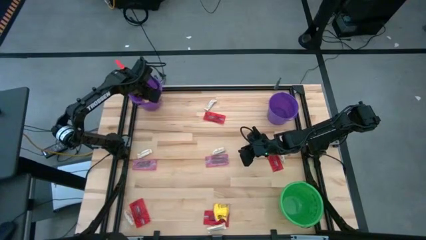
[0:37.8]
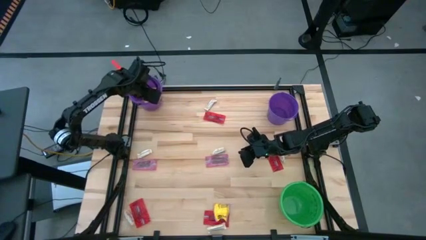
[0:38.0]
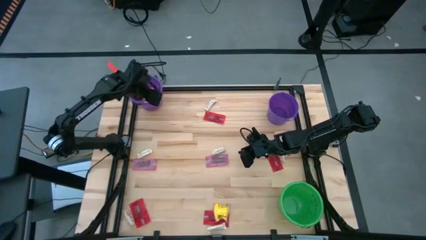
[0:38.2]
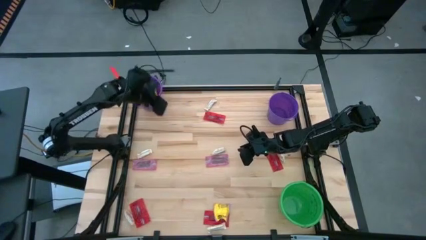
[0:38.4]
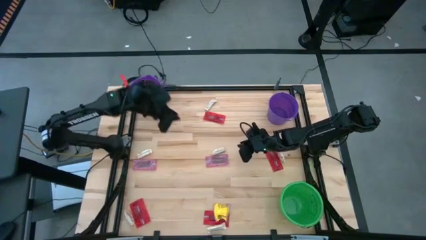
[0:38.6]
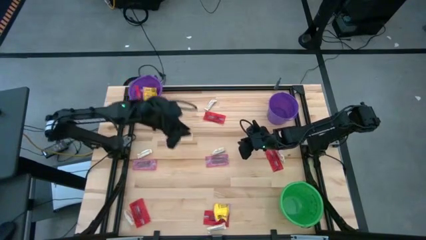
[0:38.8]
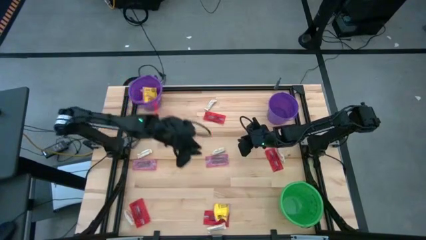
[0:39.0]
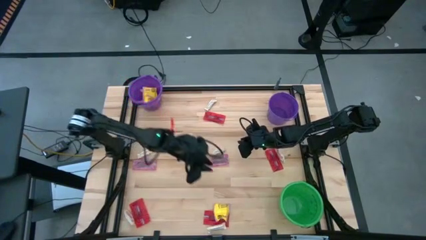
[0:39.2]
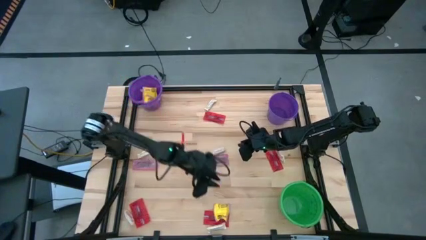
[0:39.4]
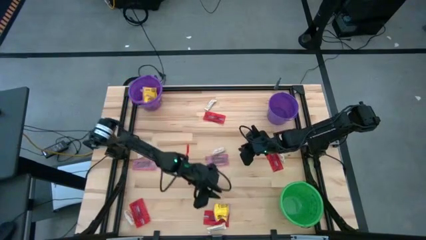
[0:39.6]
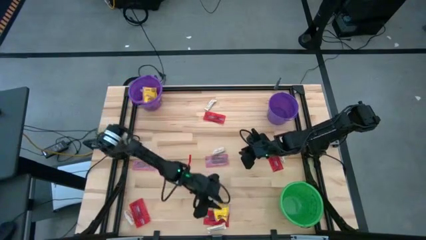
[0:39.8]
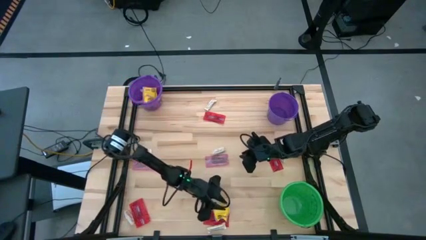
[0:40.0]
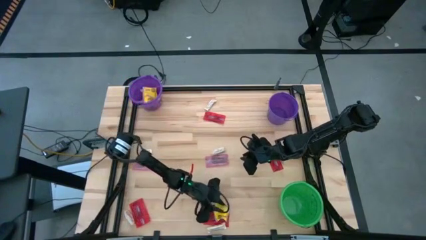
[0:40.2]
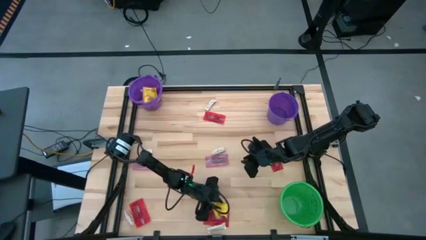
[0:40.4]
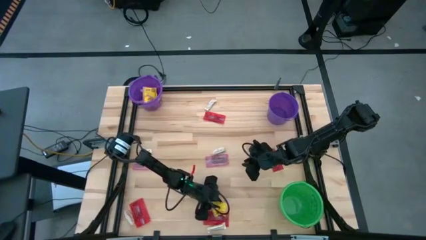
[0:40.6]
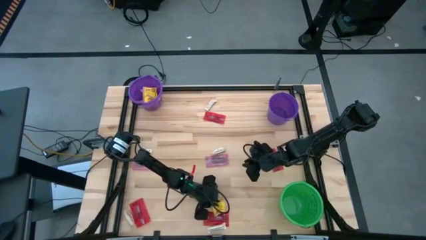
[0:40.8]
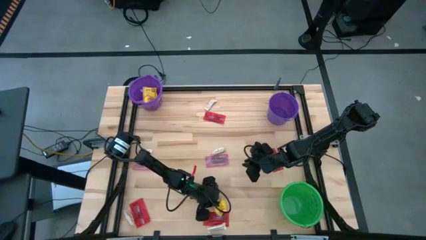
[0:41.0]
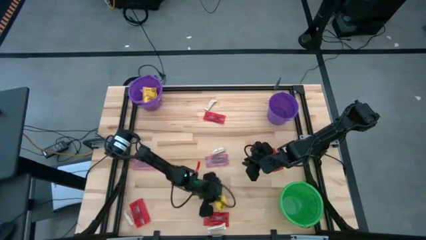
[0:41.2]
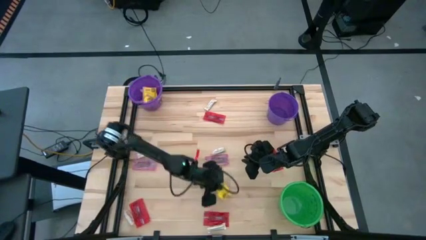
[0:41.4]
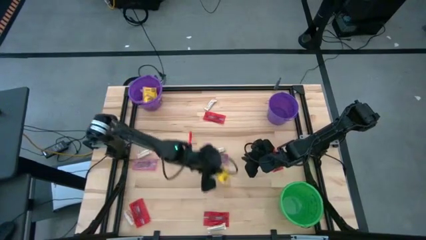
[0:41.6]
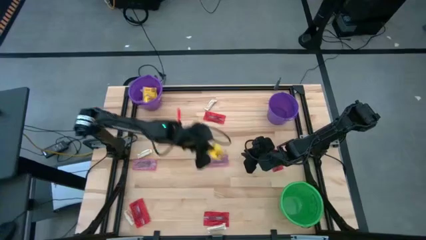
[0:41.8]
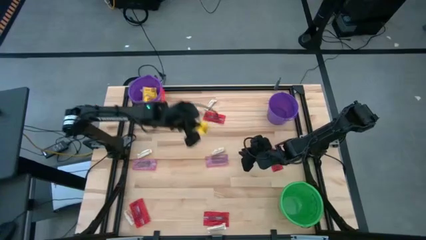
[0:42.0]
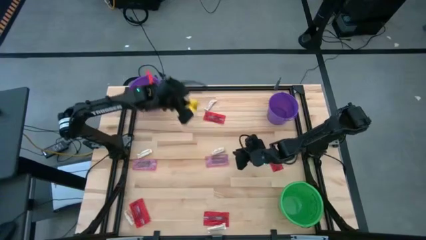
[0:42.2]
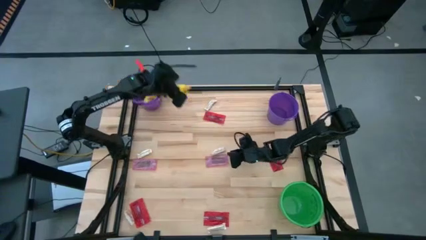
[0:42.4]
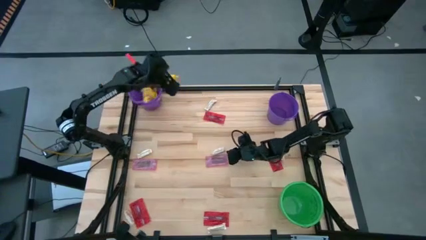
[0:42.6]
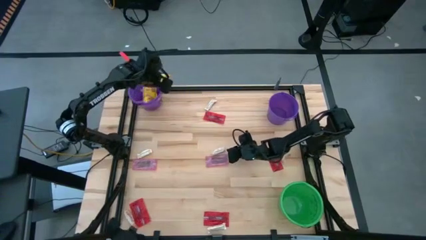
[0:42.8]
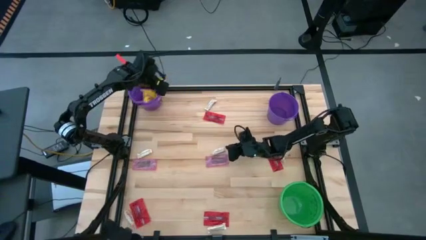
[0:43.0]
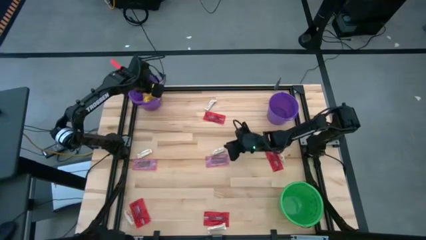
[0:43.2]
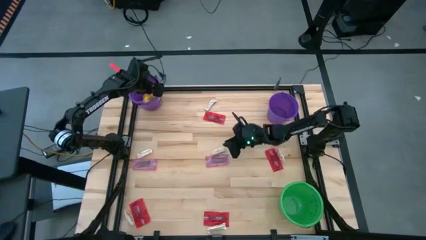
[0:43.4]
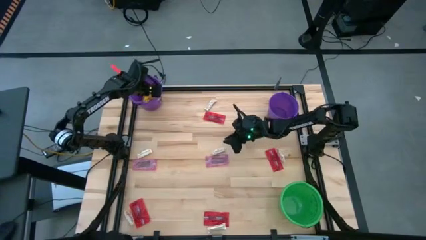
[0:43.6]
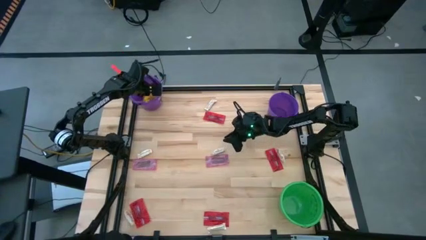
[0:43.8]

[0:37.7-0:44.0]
Task: Sort candy by brand, put in halloween buckets
Put the yellow candy into the left purple bucket

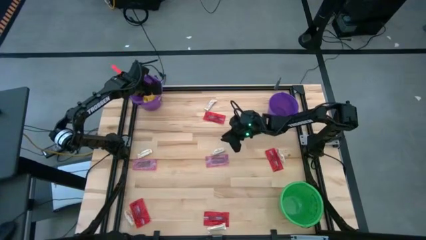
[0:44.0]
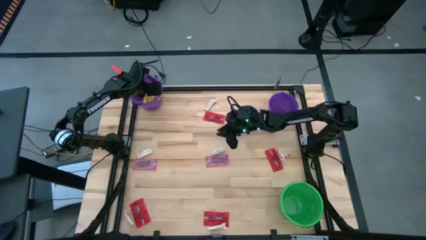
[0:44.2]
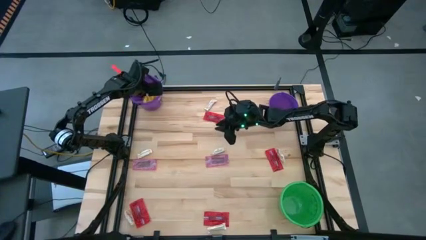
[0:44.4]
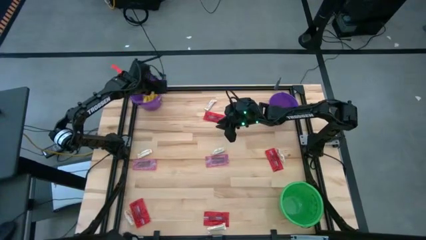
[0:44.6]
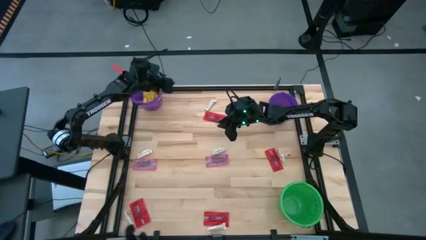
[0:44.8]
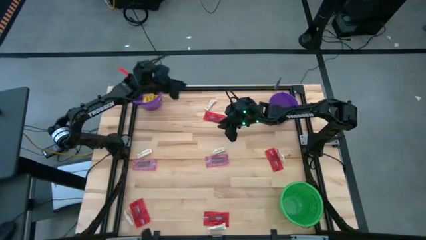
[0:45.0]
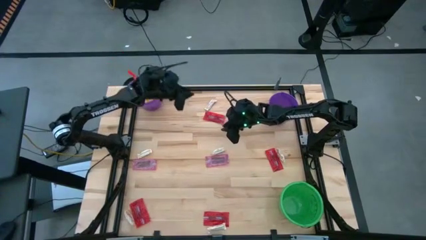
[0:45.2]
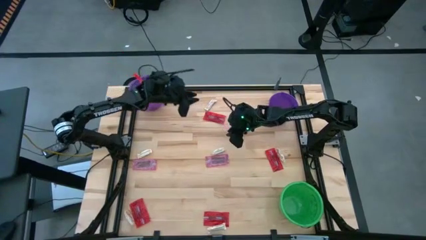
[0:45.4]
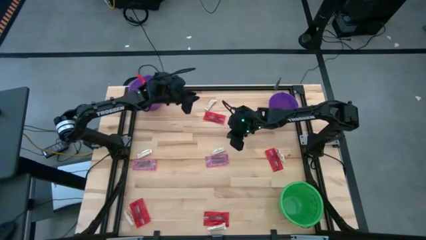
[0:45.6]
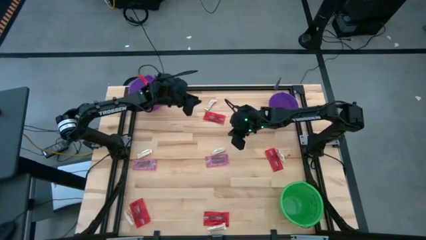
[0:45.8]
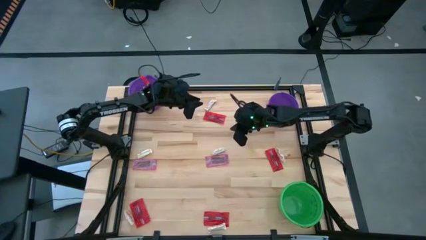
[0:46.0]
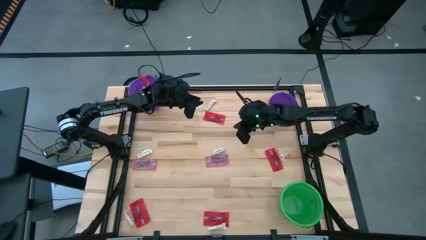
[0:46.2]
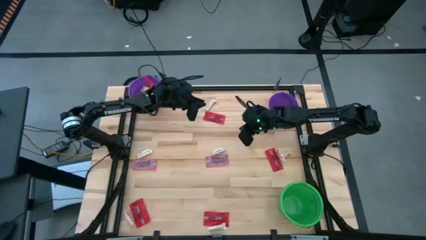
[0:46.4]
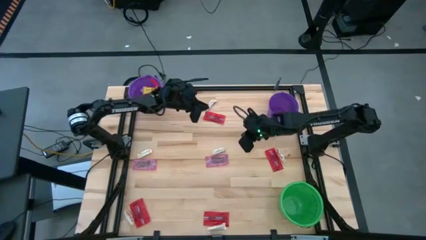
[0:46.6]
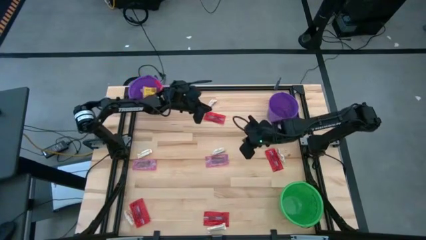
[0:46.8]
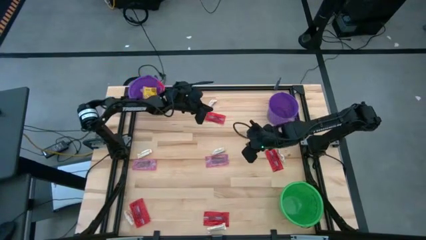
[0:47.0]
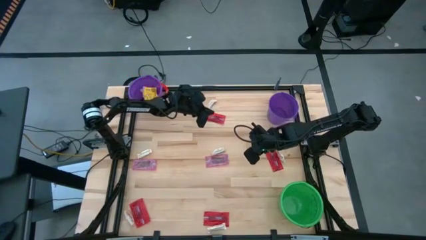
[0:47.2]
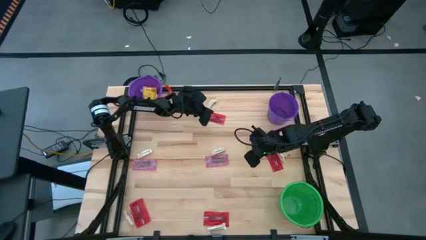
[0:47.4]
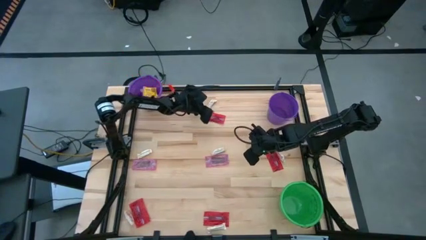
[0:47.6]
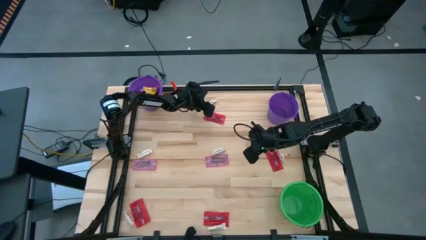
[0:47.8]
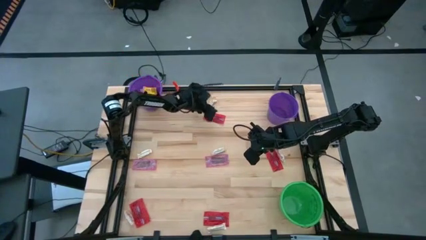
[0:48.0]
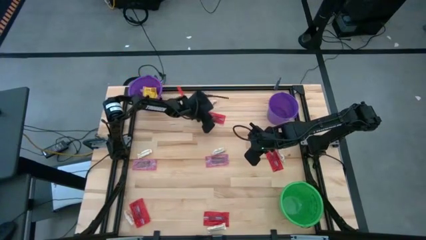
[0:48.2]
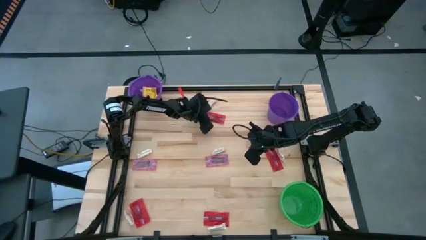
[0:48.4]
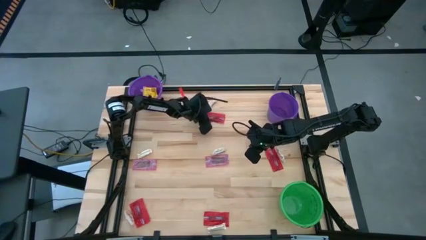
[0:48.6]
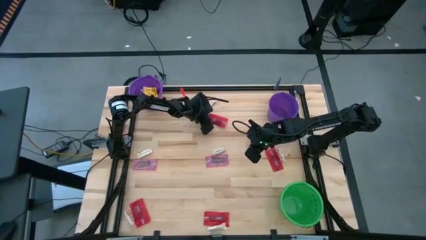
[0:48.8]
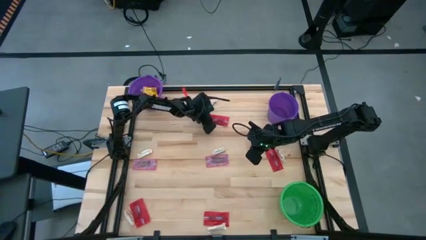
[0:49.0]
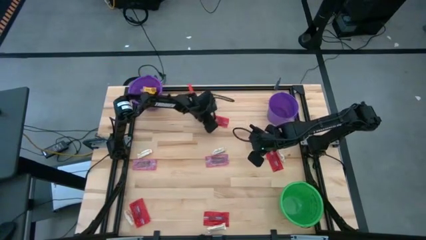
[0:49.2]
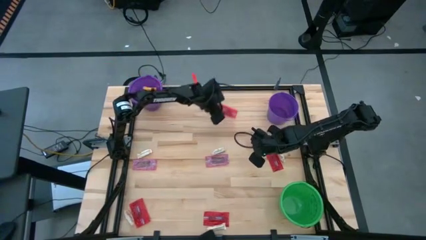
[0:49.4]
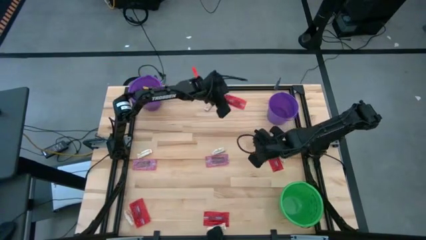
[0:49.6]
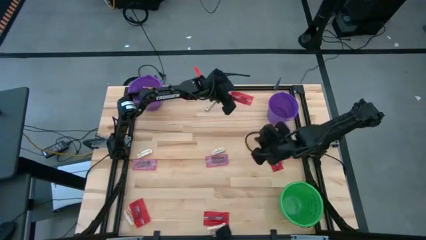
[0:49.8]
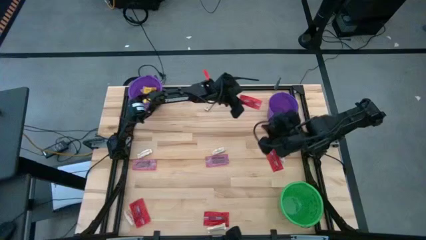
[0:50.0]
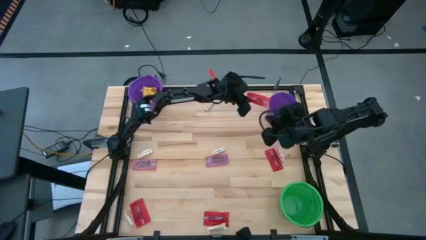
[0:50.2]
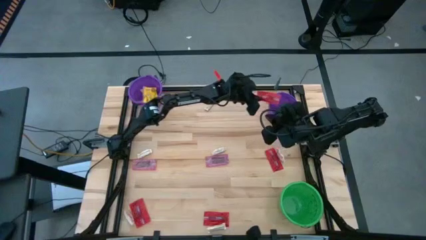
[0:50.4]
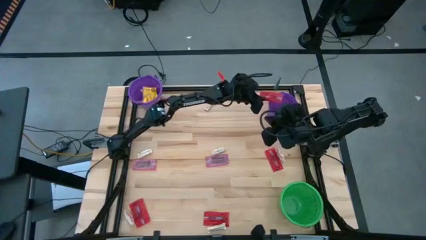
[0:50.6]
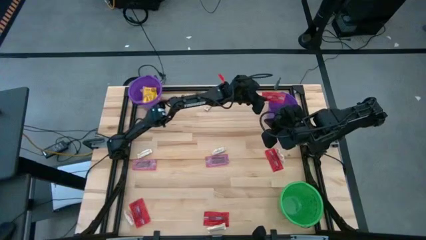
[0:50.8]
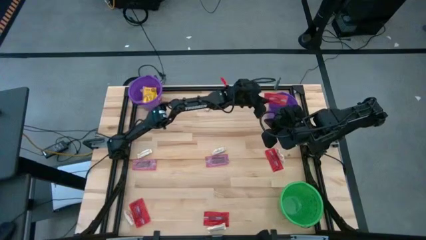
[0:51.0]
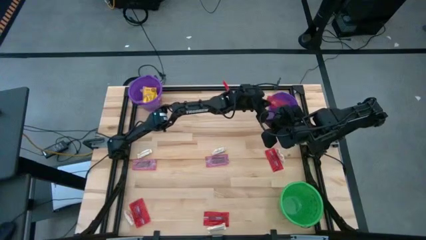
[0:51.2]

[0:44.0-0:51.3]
Put the red candy into the right purple bucket

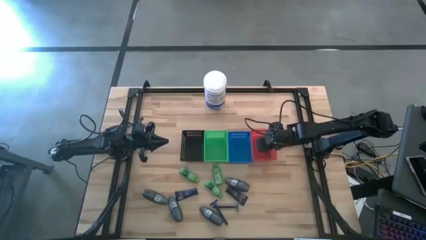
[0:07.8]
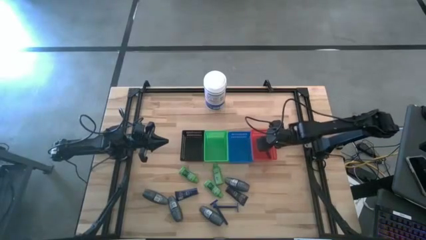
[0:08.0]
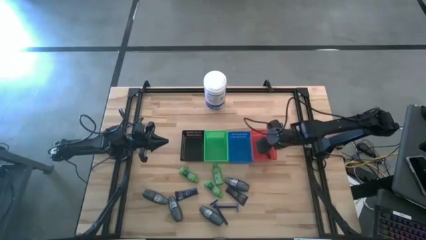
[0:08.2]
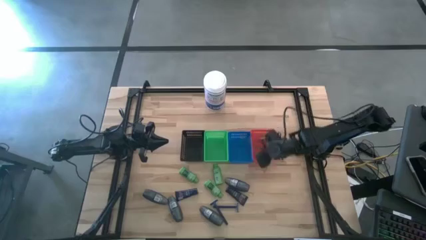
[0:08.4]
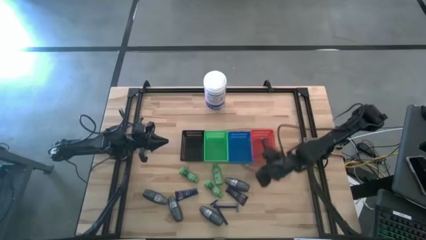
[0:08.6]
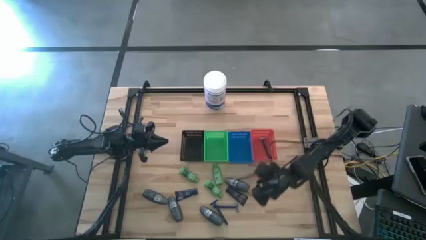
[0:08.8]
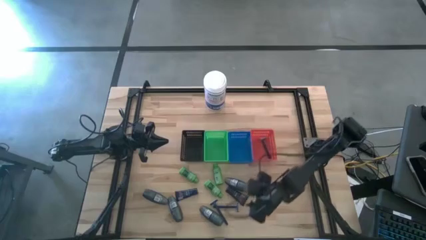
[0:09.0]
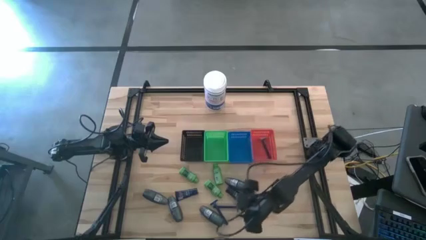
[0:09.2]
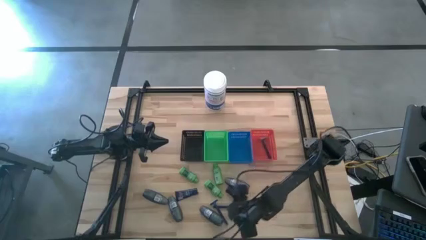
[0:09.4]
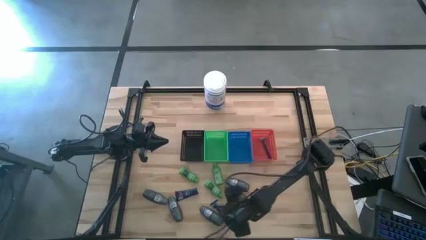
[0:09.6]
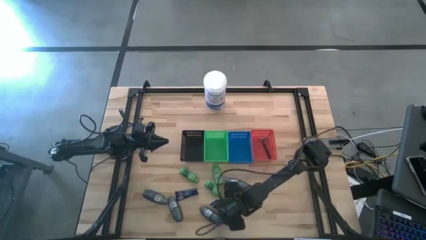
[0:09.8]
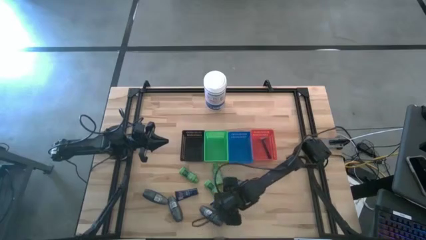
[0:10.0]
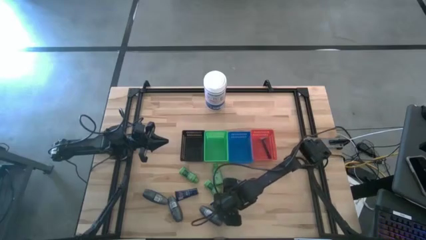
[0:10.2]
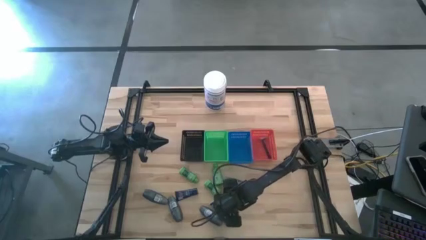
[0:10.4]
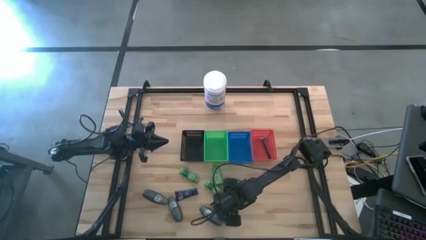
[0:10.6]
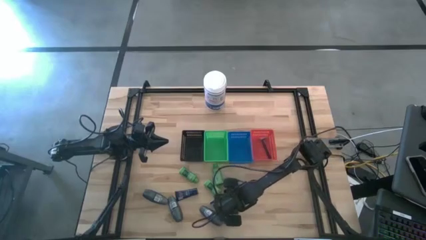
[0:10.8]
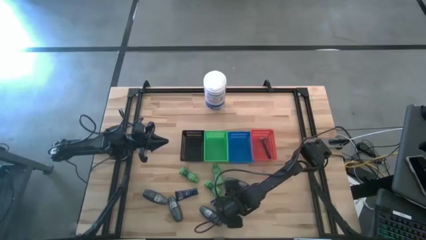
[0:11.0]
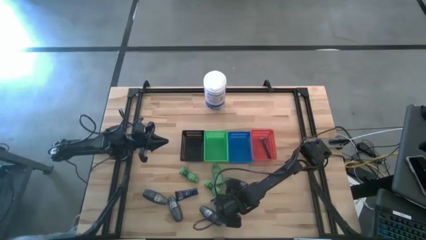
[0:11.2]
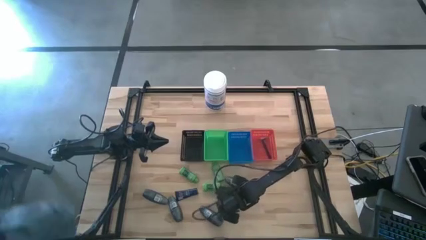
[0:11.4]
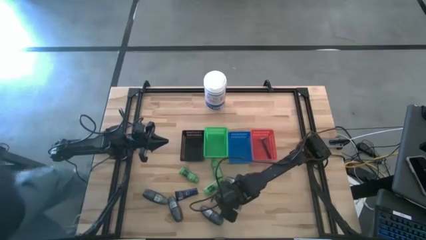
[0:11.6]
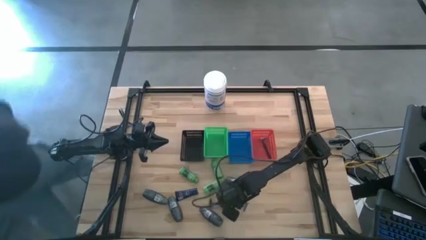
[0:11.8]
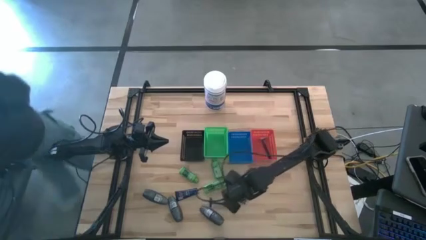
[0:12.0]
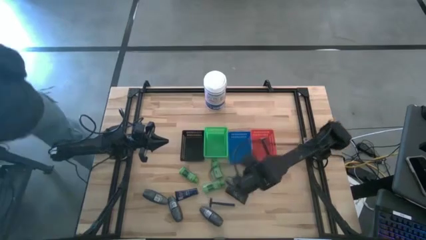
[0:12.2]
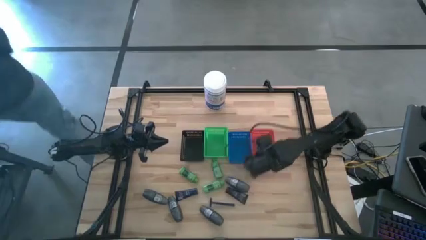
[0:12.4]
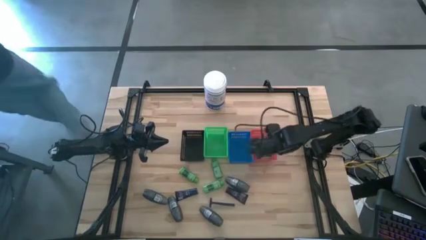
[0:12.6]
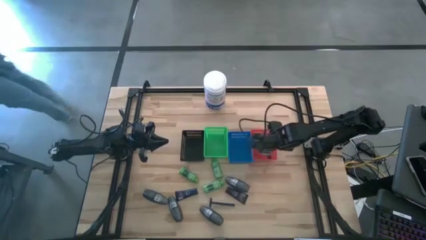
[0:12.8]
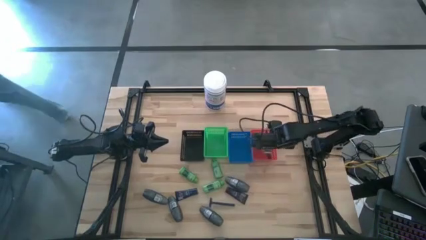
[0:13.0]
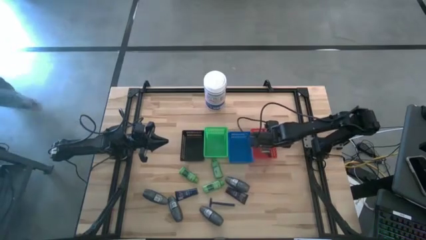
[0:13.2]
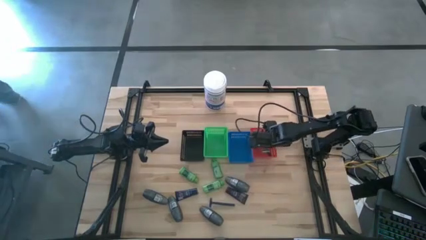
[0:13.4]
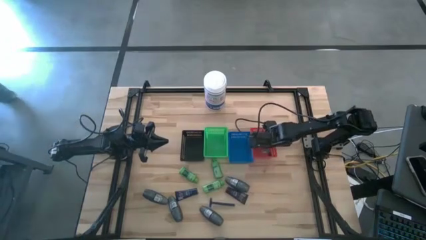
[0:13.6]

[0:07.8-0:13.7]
Task: Pick & Place Travel size toiletries
Put the blue razor into the red basket
